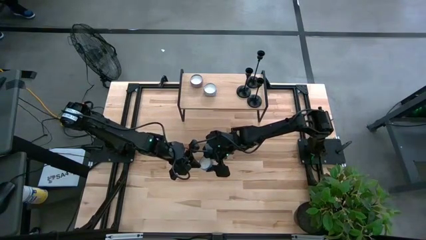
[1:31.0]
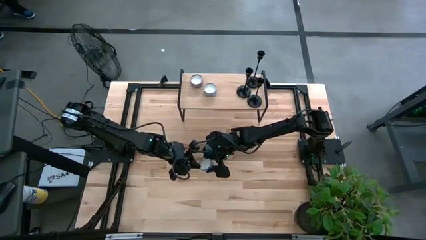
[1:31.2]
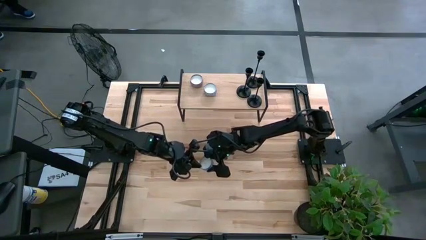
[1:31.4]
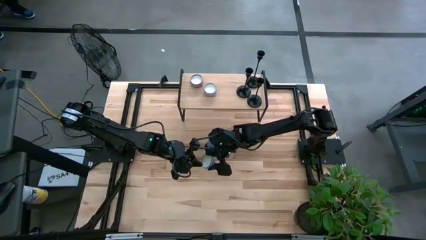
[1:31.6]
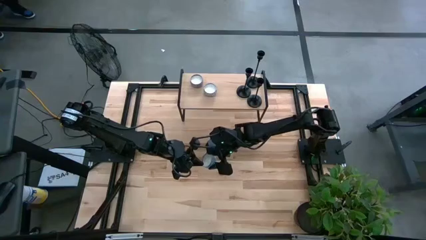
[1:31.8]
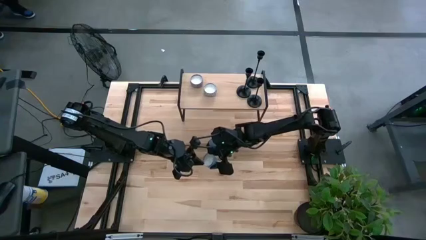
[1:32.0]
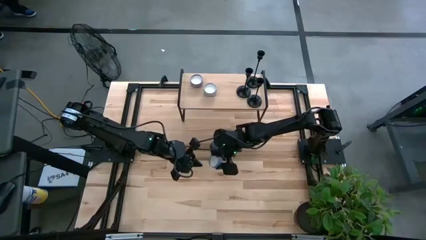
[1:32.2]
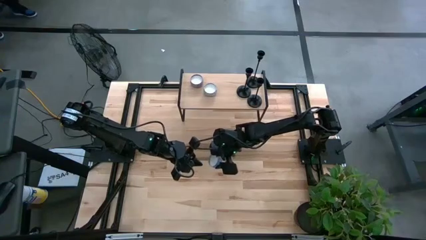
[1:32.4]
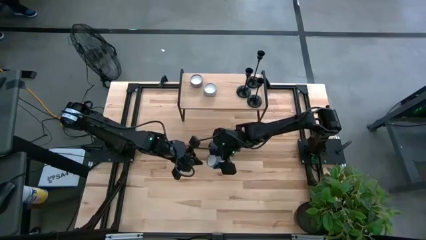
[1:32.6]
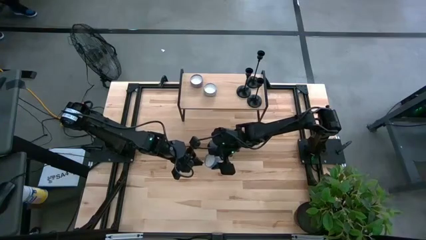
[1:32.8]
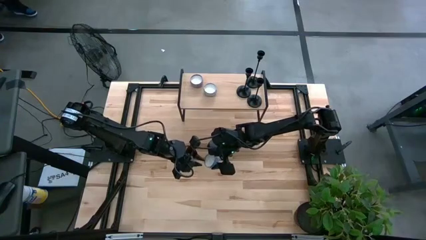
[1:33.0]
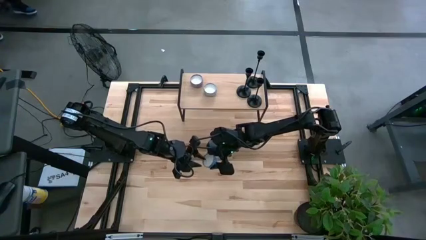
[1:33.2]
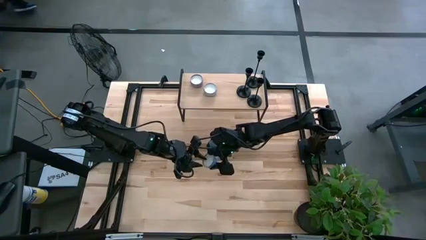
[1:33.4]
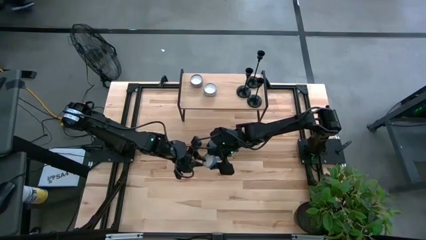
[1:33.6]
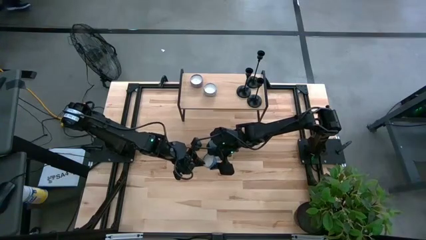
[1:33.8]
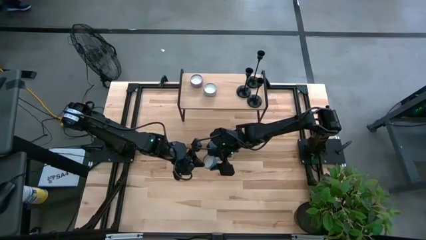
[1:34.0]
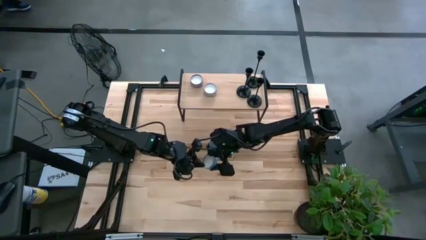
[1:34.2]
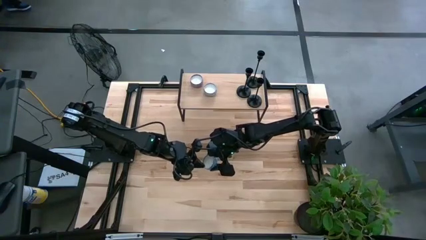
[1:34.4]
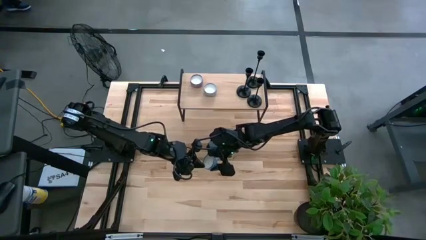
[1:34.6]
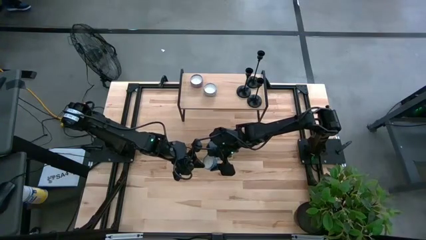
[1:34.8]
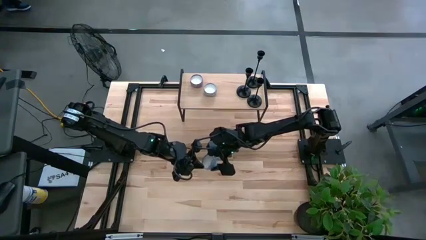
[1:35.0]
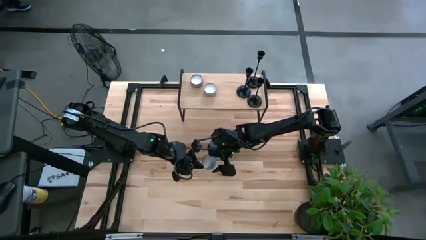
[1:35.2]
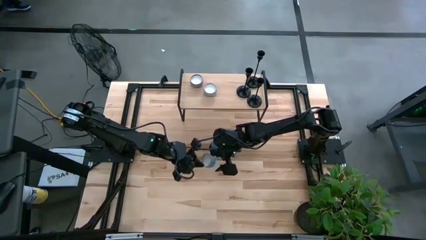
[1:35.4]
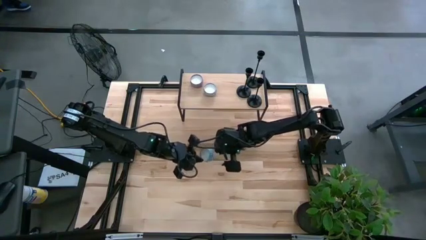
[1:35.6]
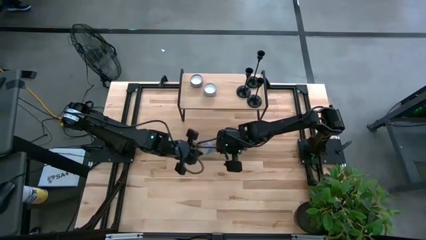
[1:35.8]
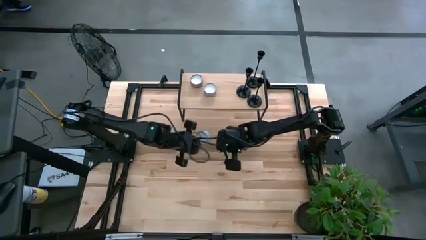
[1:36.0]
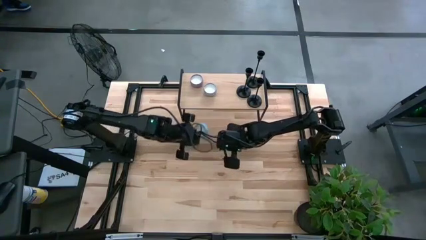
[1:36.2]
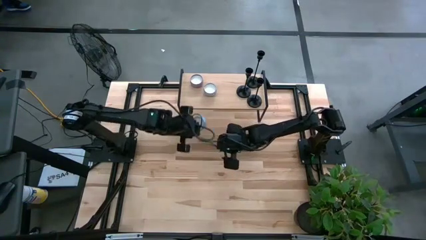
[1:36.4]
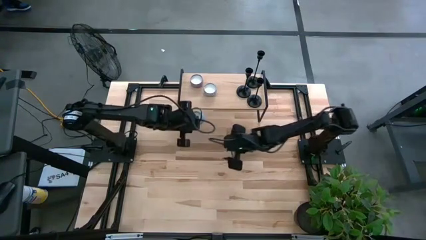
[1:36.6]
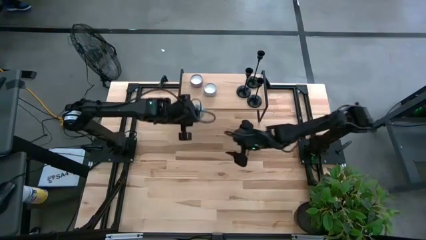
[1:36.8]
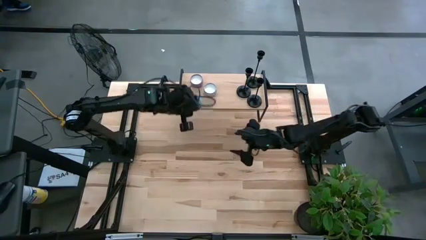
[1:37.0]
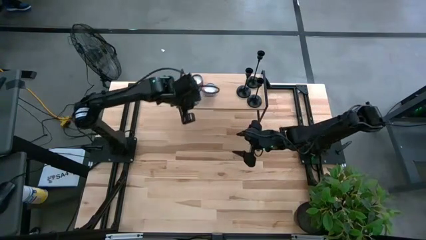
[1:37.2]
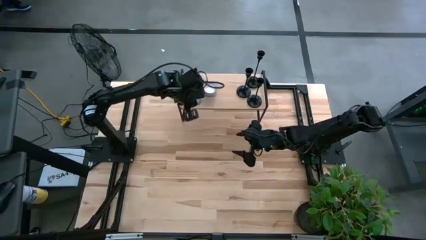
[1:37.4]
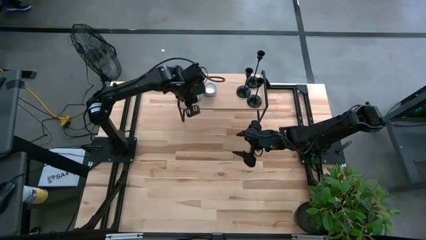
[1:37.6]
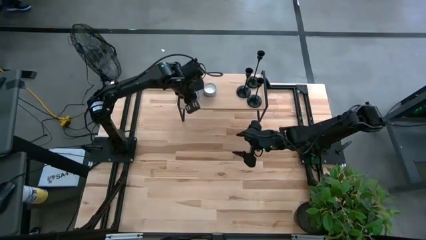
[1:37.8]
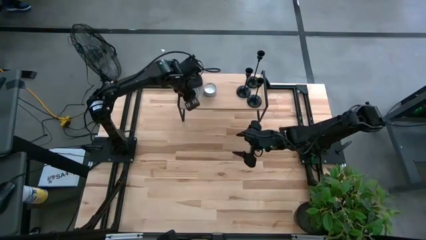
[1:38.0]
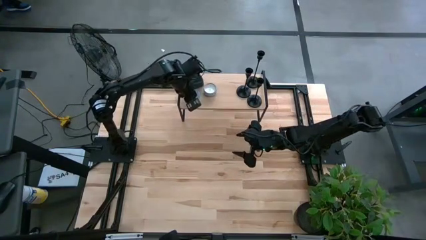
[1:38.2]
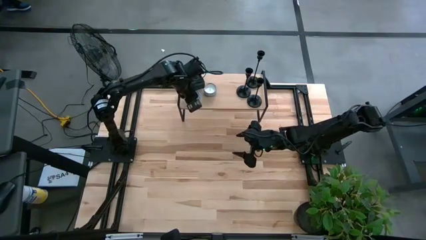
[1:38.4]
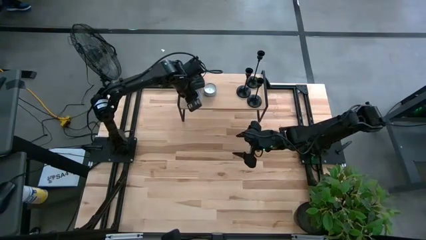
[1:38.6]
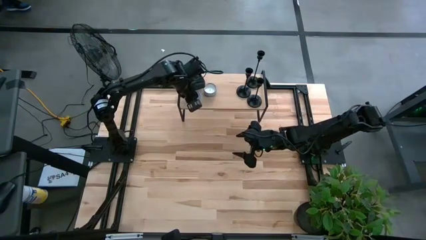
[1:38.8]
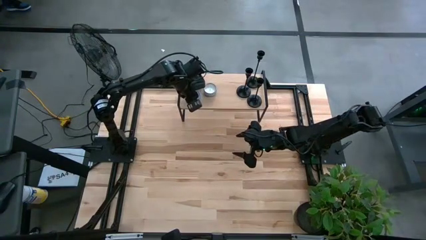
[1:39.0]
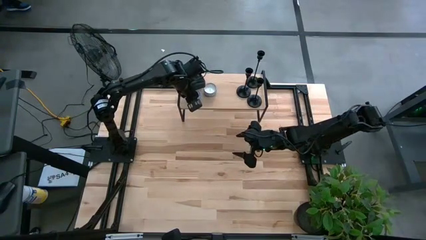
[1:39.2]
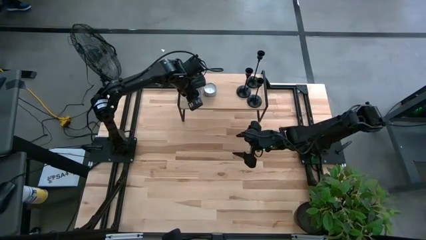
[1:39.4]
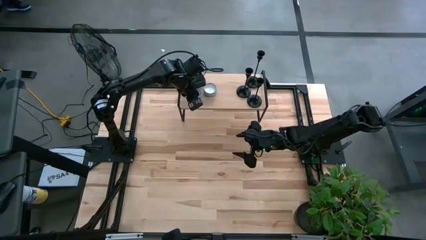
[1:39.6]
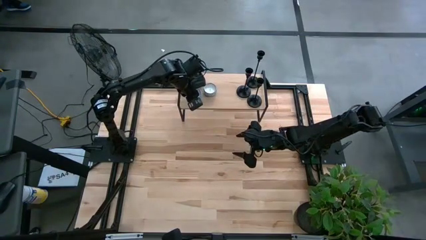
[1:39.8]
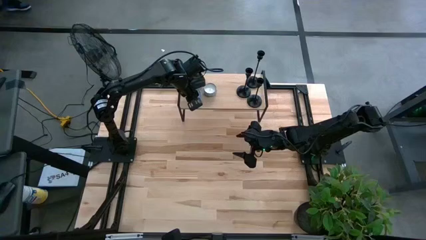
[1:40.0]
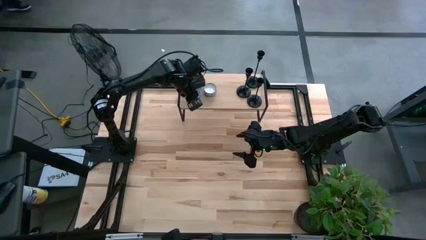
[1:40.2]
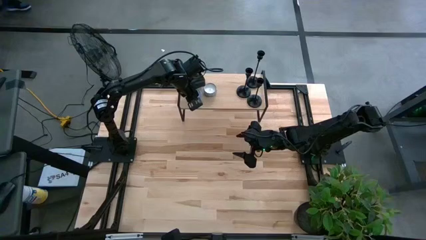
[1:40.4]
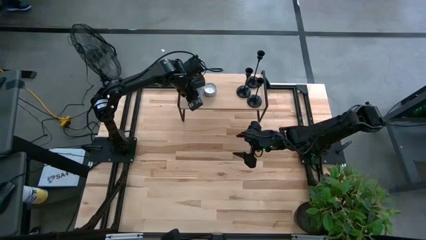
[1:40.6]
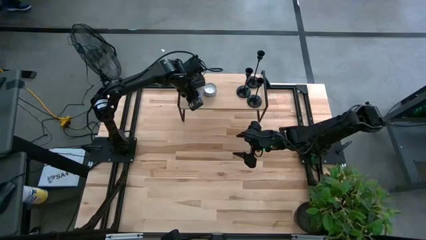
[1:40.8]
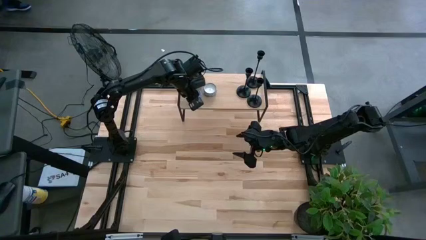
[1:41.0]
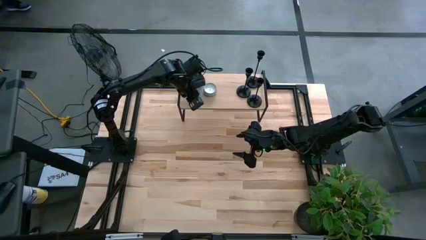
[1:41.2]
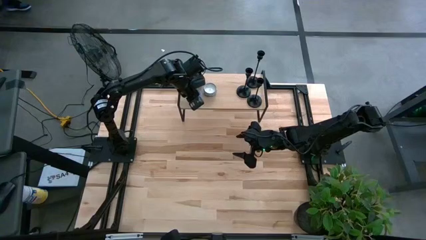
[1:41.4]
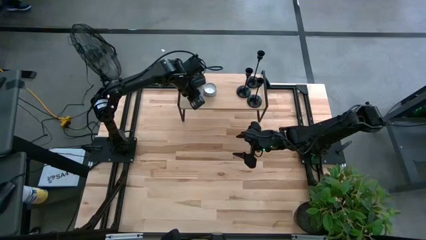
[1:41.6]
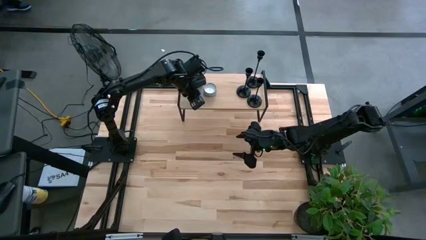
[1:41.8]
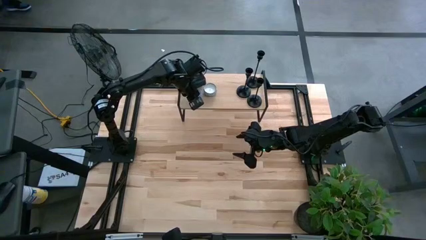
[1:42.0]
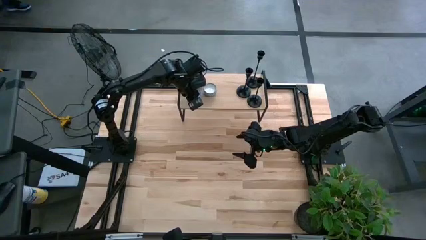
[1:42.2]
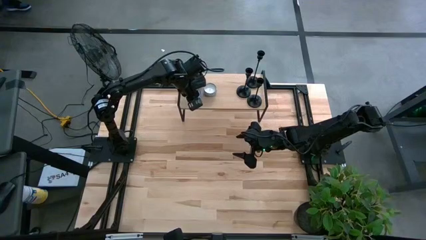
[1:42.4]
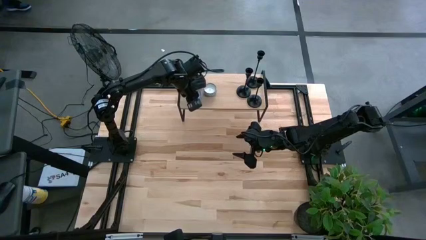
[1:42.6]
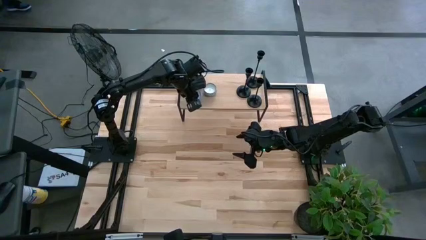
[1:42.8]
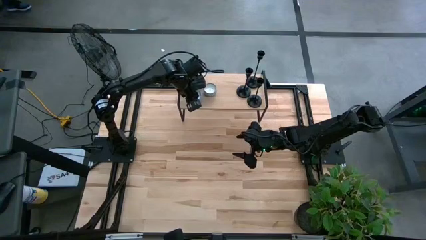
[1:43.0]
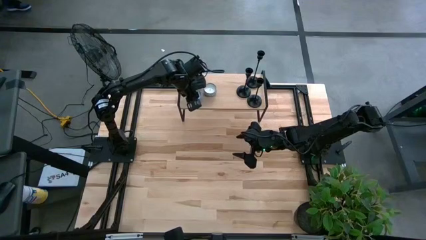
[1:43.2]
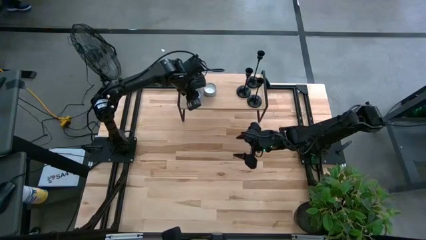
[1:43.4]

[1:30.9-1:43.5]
Task: Pick & Place candle stick holders
Put the blue scented candle on the shelf

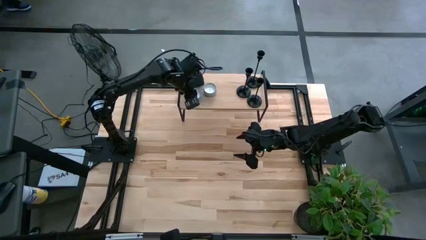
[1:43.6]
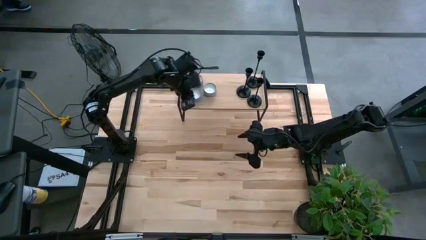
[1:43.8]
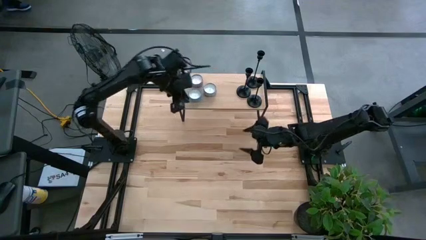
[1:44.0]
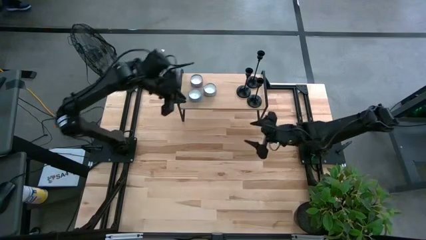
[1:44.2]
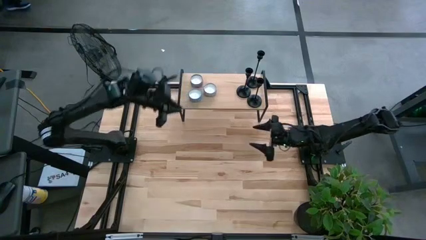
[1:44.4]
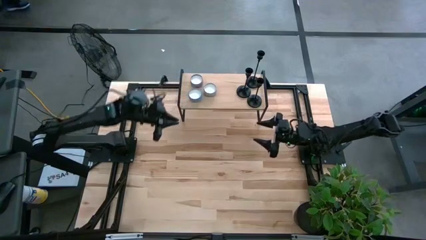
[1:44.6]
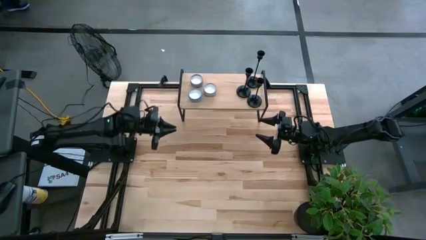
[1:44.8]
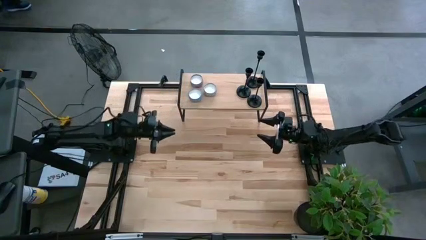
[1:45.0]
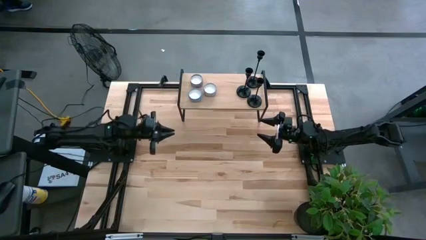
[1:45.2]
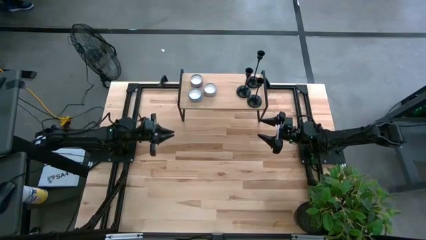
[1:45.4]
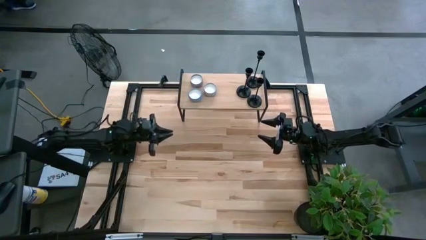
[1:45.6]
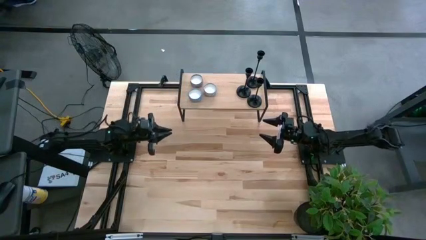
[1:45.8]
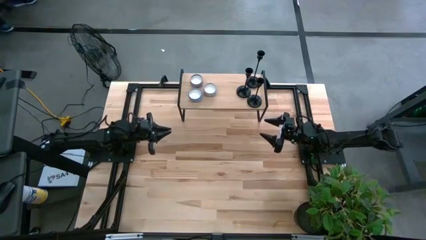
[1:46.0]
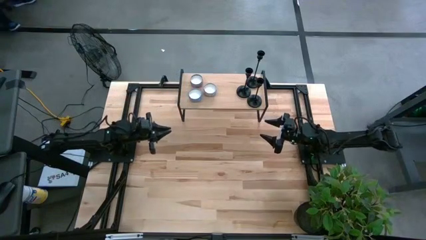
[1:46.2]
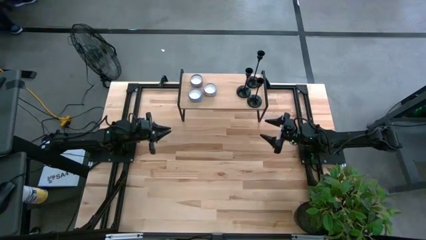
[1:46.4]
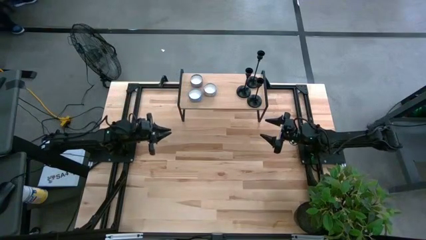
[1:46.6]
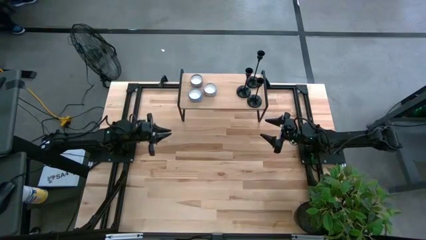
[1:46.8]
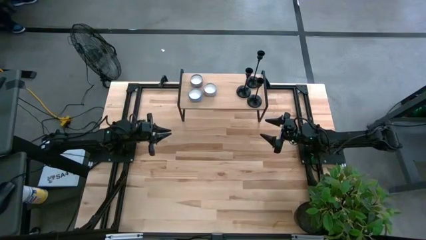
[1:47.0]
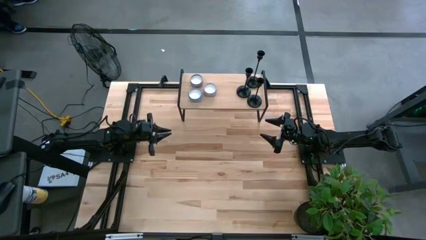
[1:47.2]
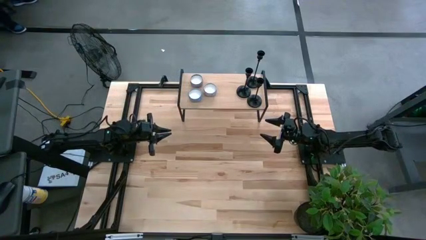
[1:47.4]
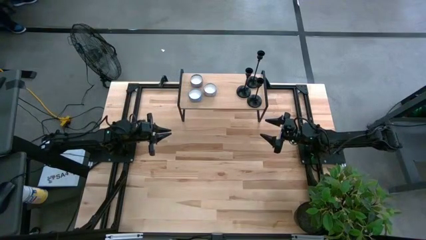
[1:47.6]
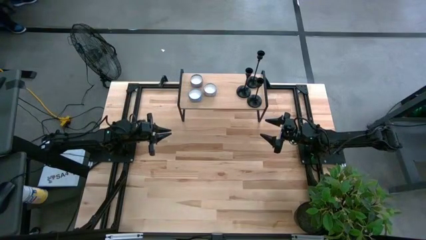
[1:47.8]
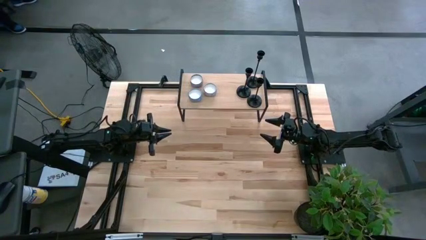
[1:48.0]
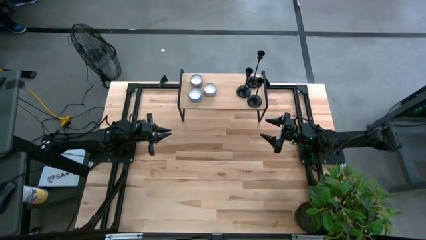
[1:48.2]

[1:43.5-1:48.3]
Return to Home Position
